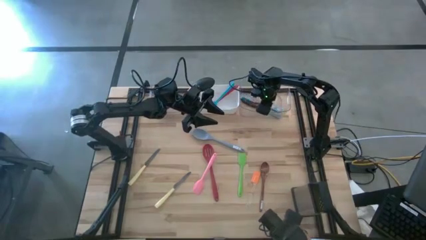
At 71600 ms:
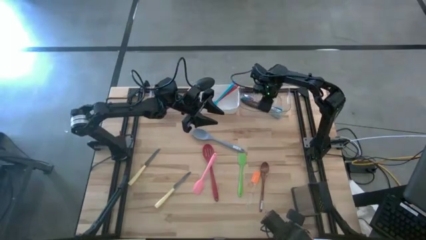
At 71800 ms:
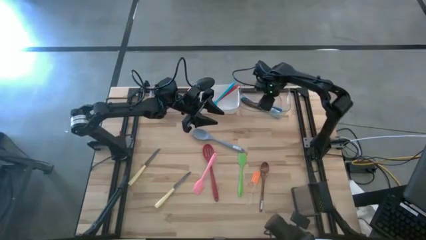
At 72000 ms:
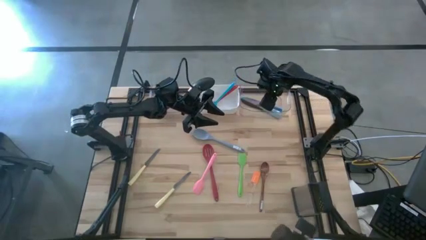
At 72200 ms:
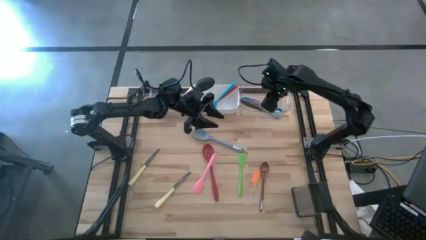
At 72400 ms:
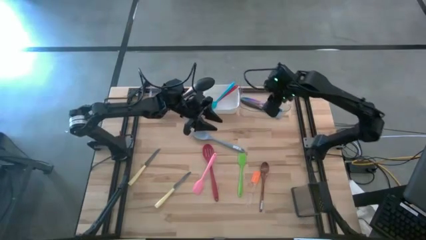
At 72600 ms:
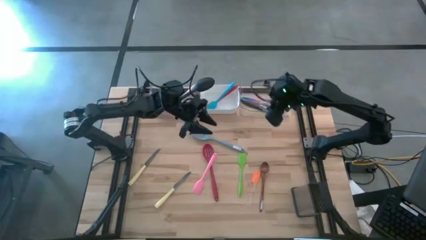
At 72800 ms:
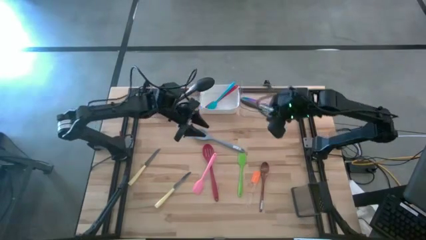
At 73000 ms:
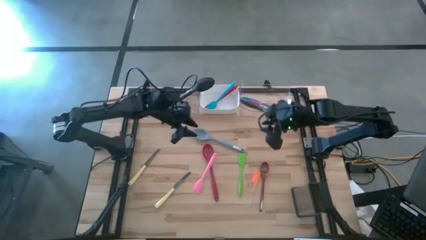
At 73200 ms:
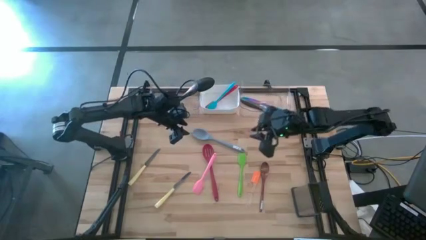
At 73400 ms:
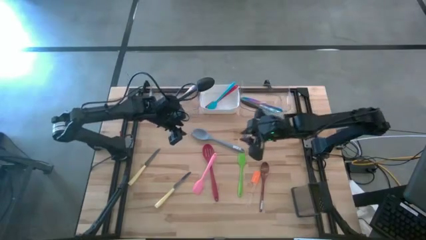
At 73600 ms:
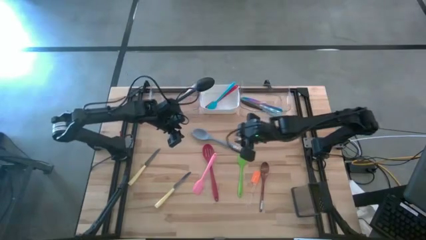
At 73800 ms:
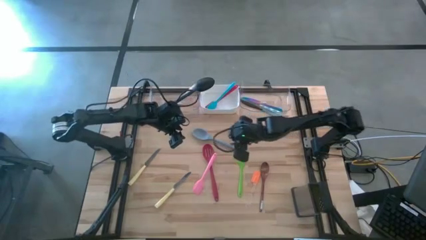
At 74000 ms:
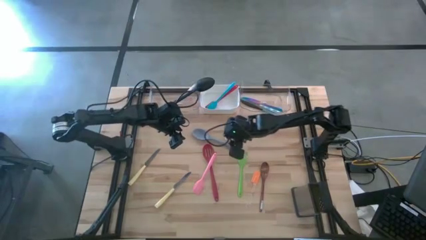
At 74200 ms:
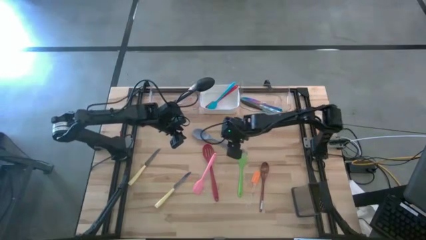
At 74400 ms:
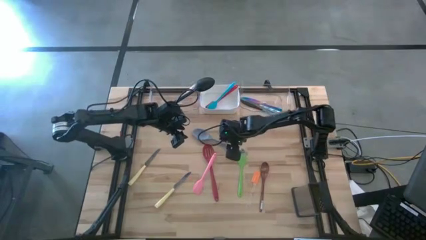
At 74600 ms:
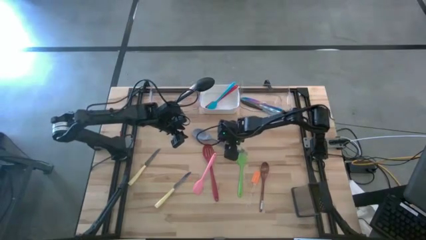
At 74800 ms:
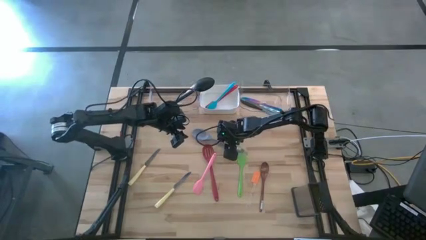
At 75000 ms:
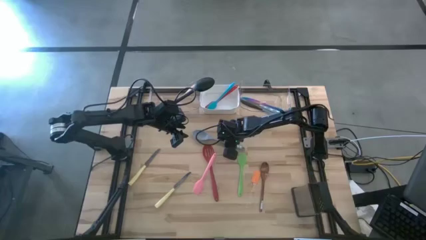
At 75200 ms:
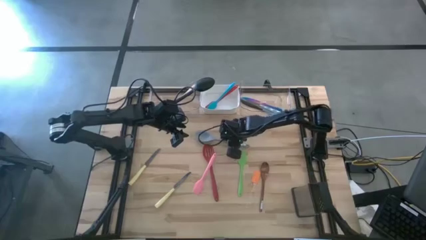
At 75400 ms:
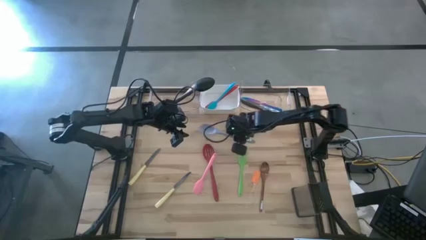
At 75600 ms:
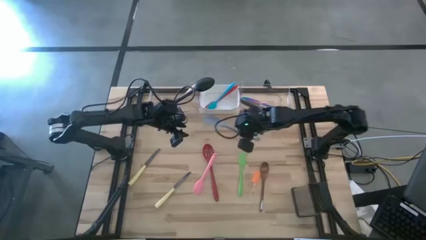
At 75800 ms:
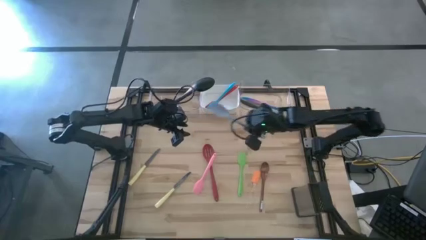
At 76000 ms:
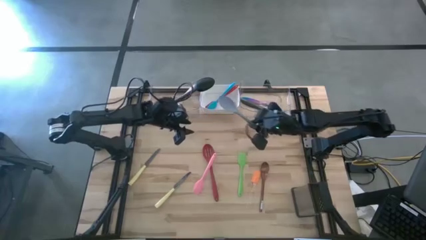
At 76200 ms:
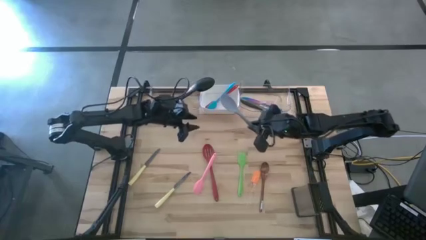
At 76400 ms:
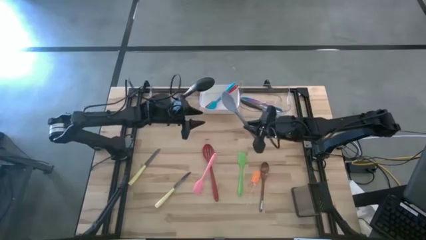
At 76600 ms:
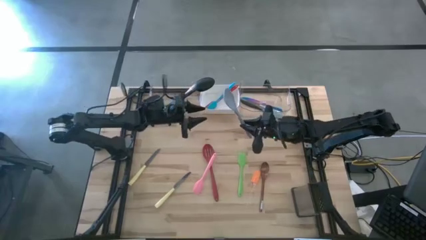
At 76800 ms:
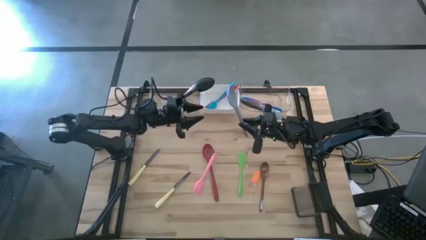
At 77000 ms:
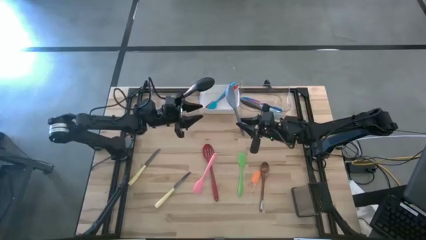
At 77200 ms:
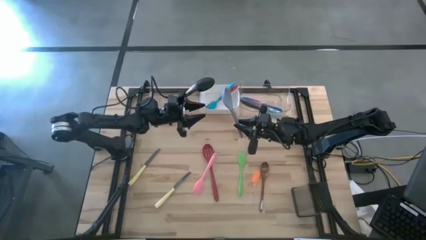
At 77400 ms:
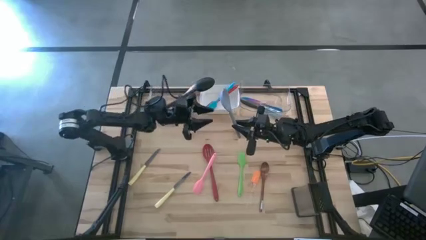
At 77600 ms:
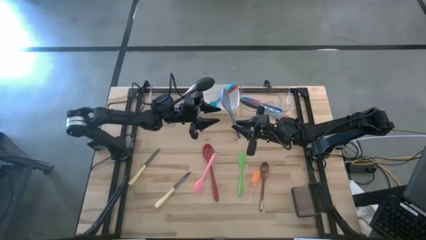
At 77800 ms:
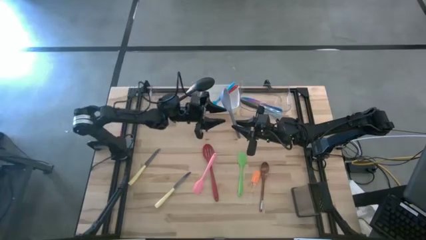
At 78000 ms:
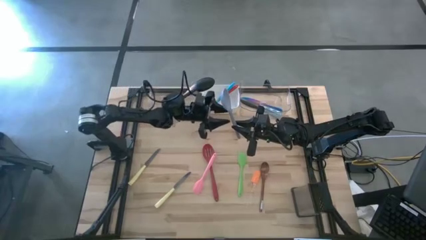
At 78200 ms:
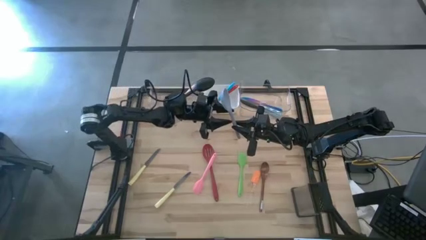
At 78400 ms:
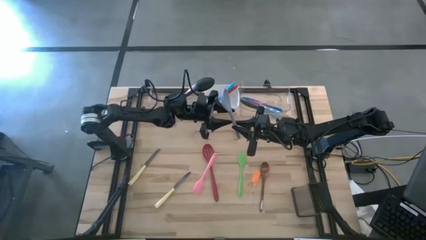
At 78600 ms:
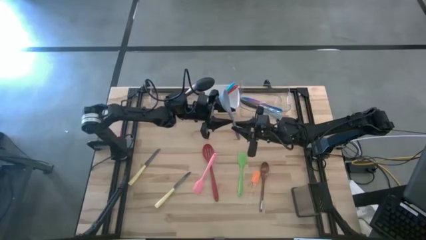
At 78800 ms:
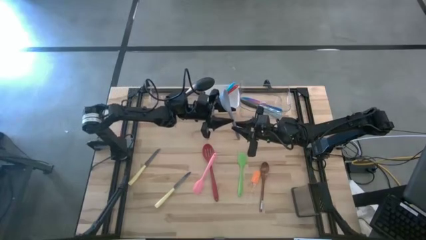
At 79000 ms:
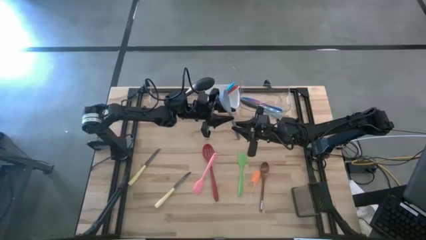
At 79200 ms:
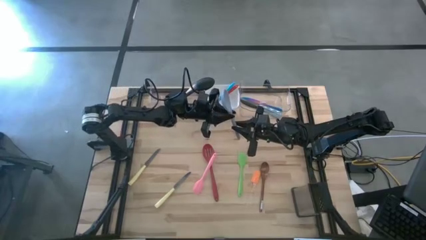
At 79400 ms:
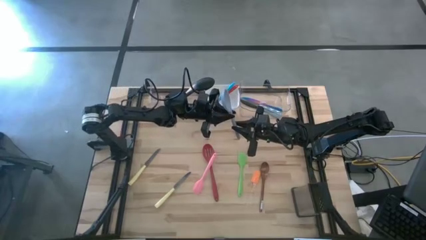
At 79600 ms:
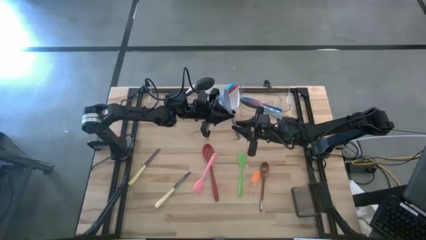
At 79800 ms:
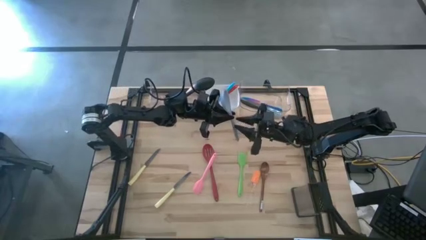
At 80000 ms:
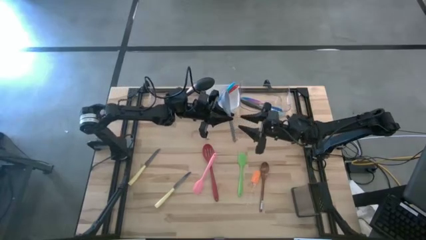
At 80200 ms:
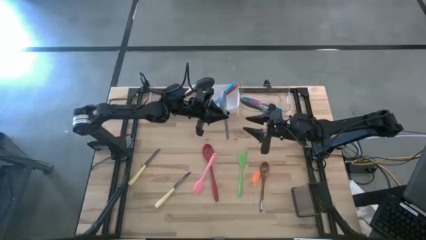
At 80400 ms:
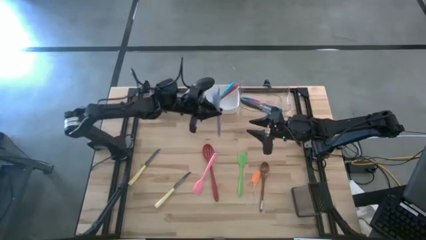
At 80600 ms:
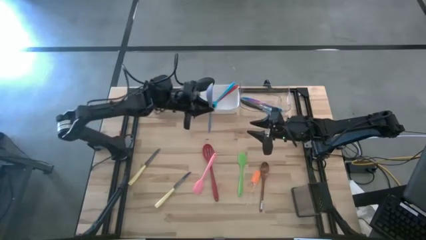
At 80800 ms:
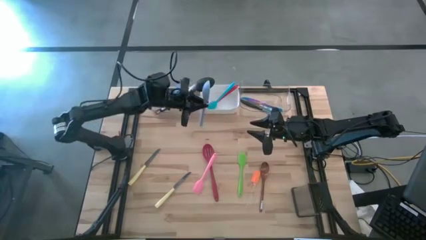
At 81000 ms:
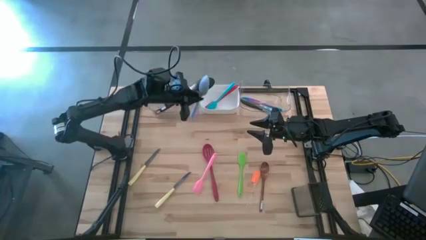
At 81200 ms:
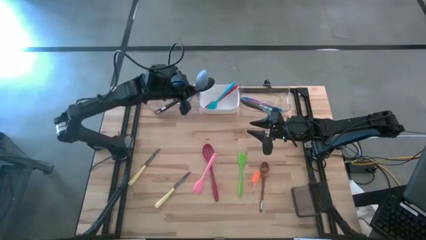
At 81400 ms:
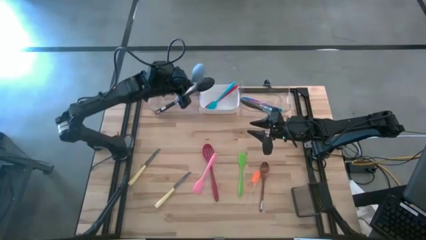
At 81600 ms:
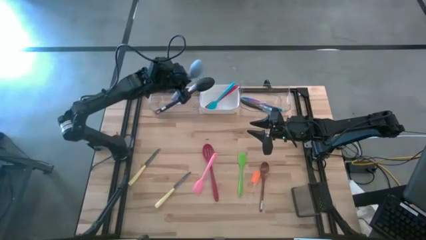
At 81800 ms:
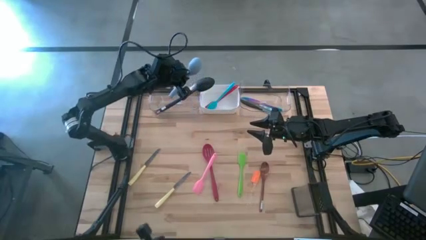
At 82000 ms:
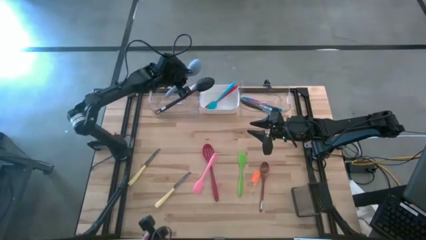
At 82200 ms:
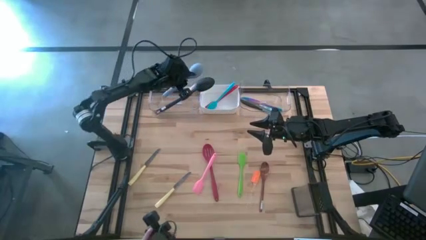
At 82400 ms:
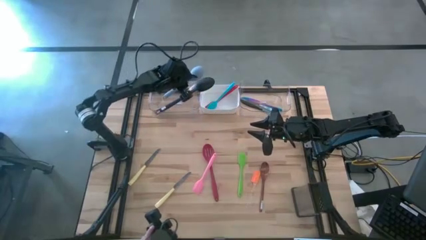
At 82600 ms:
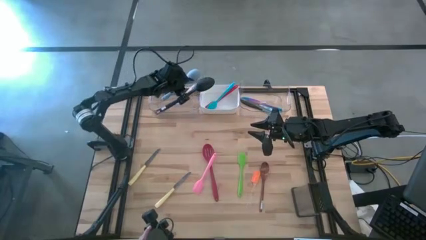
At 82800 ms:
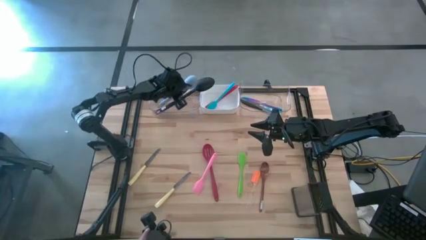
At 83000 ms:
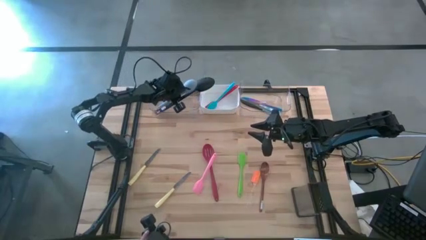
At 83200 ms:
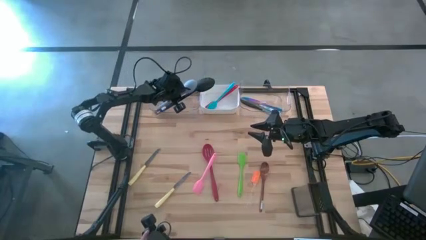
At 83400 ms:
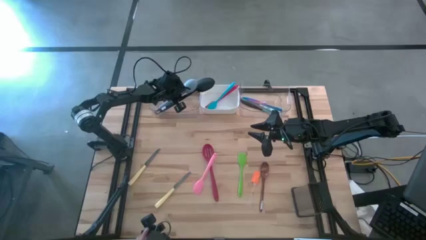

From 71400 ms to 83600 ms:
Task: Pick & Place Kitchen Items
Put the gray cooking spoon into the left transparent bin

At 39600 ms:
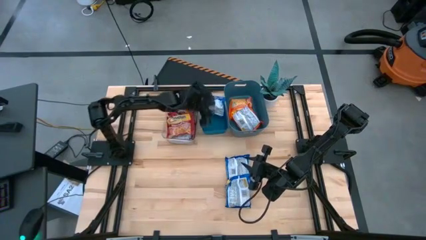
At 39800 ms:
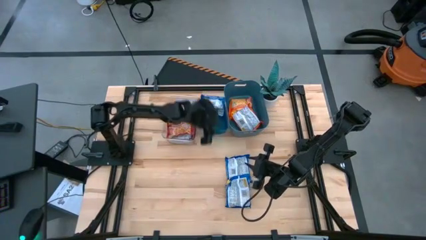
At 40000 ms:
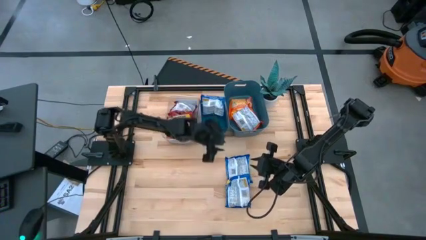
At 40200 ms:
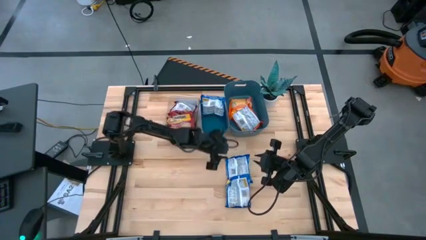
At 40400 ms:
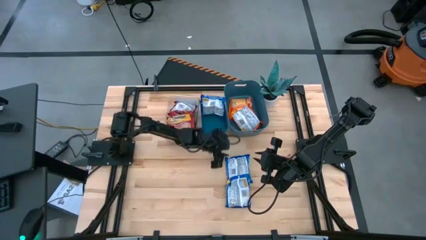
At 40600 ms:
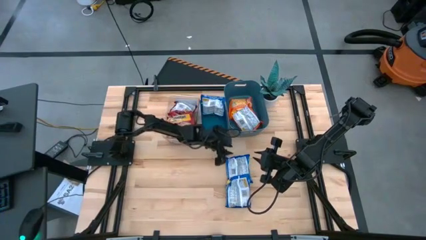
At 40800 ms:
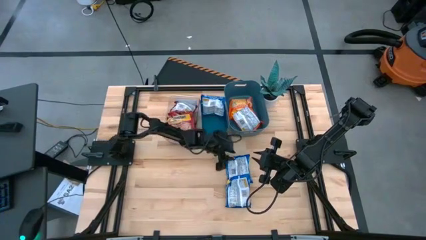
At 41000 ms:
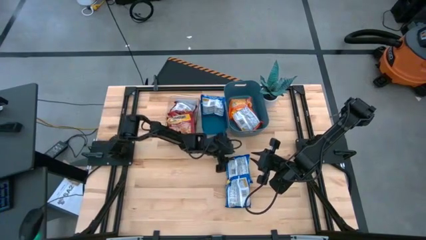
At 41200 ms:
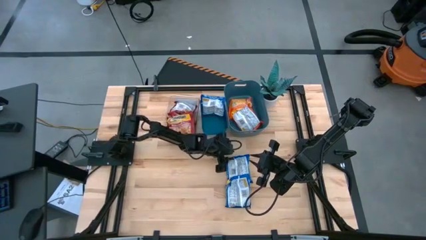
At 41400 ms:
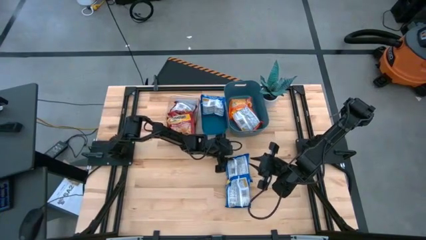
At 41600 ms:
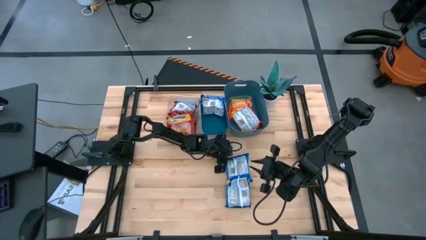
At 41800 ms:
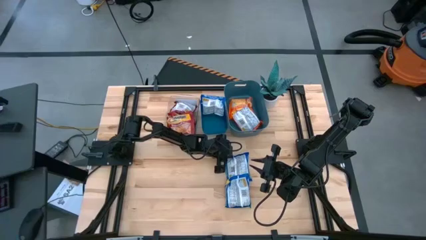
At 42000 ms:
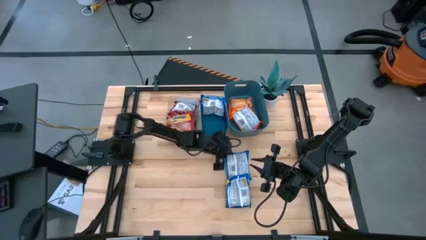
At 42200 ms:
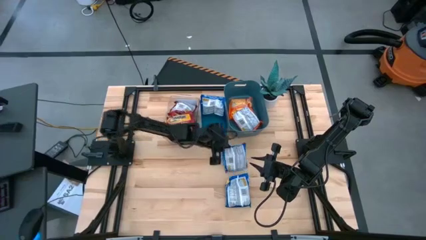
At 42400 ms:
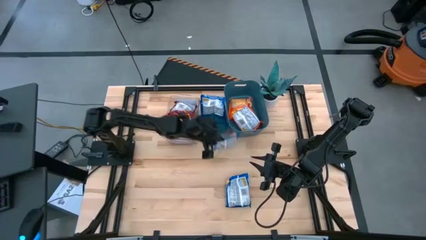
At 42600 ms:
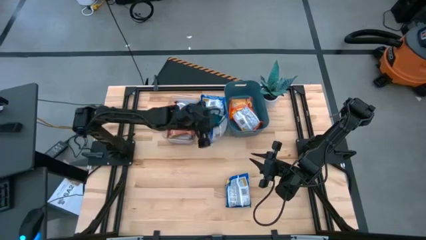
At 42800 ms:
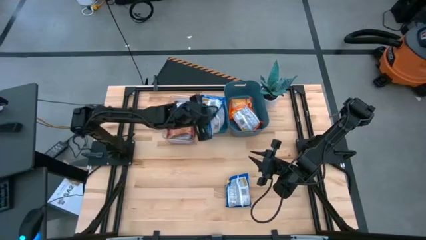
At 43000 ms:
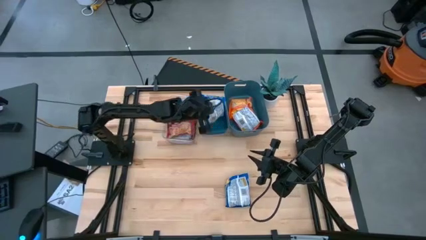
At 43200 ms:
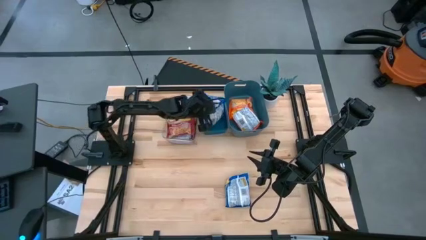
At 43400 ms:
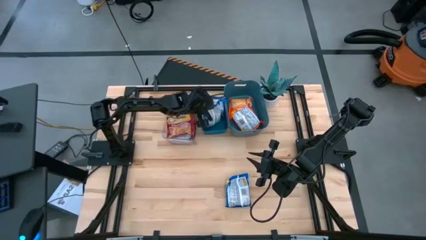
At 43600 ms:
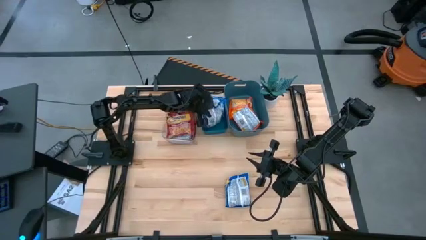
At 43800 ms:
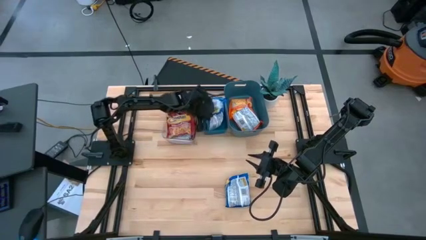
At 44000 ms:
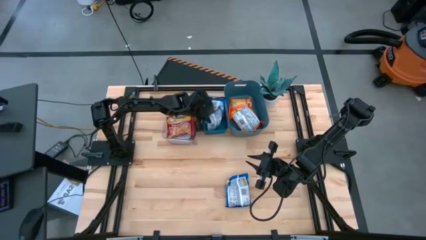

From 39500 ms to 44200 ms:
Task: Sort Maruchan noodles
Put the blue noodle pack into the blue bin
